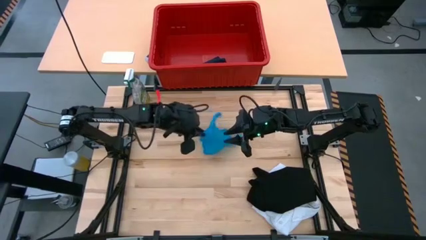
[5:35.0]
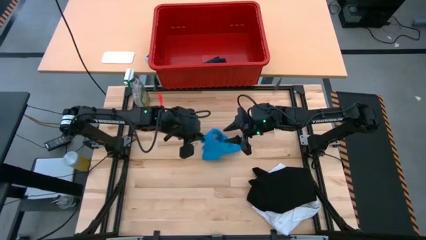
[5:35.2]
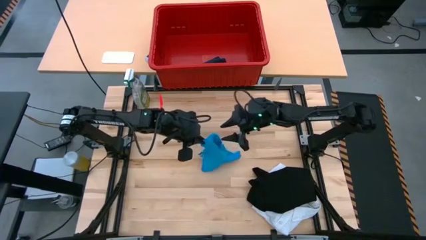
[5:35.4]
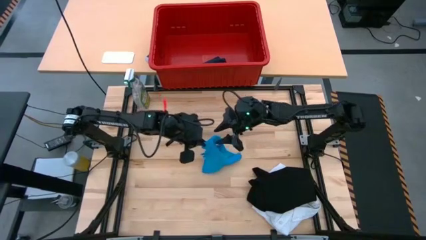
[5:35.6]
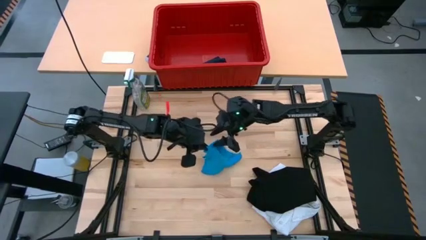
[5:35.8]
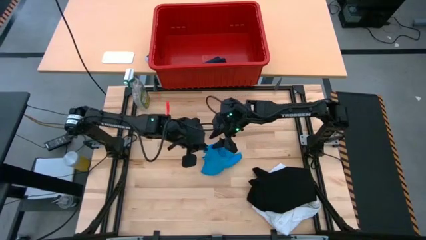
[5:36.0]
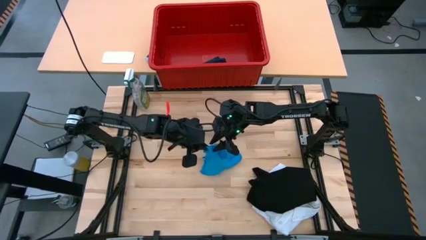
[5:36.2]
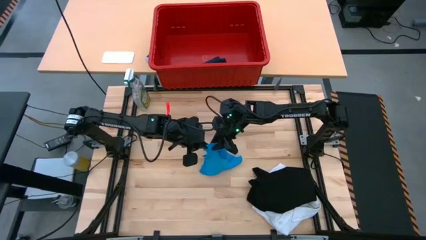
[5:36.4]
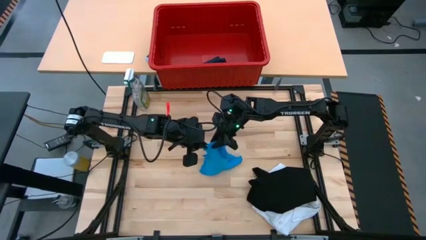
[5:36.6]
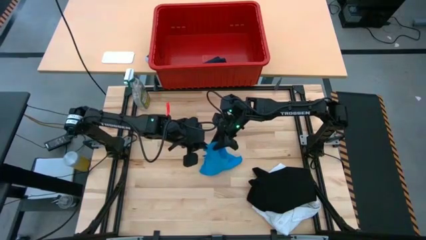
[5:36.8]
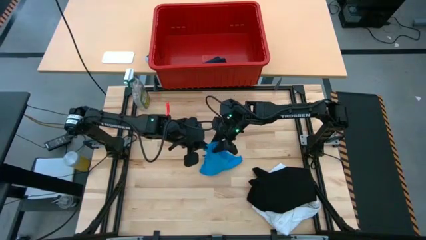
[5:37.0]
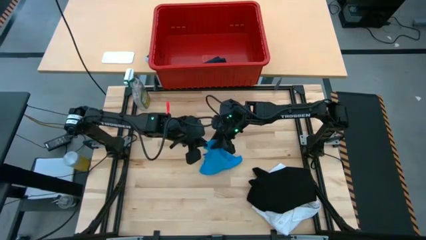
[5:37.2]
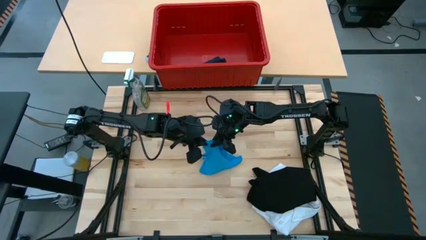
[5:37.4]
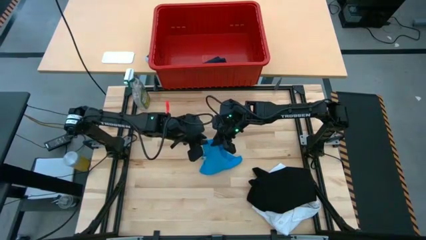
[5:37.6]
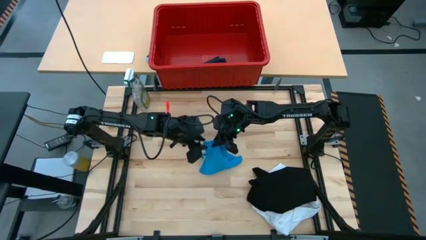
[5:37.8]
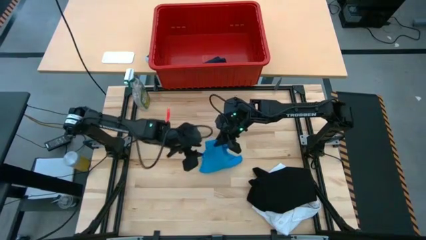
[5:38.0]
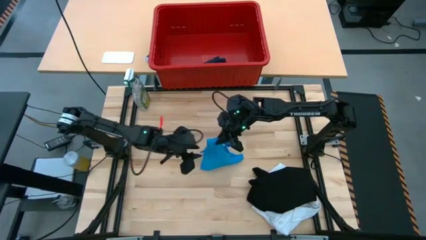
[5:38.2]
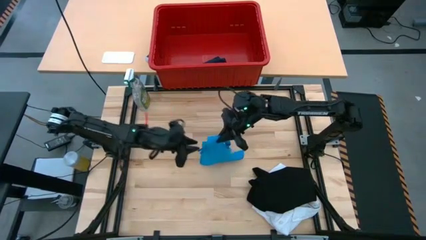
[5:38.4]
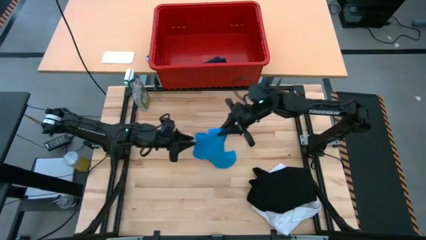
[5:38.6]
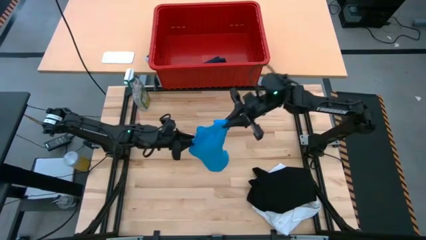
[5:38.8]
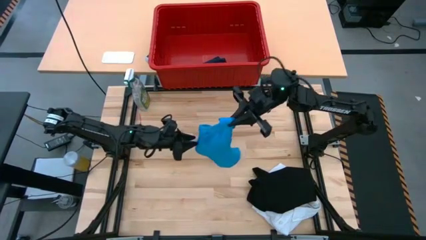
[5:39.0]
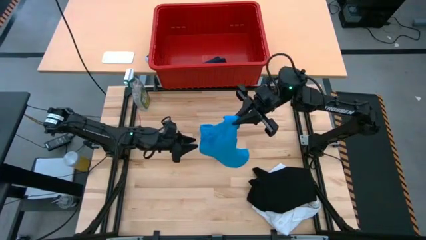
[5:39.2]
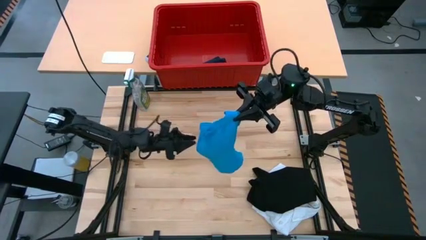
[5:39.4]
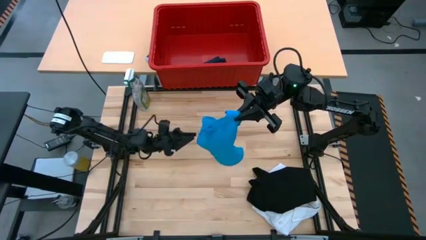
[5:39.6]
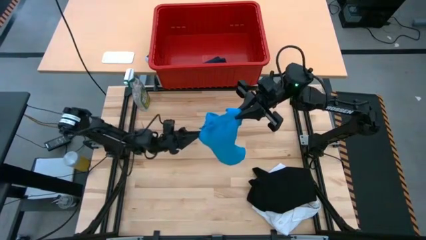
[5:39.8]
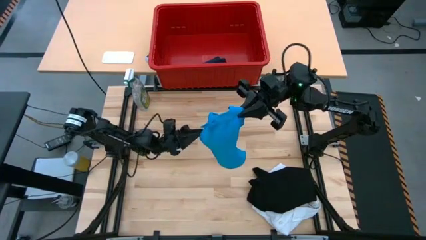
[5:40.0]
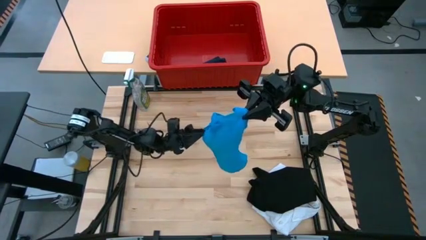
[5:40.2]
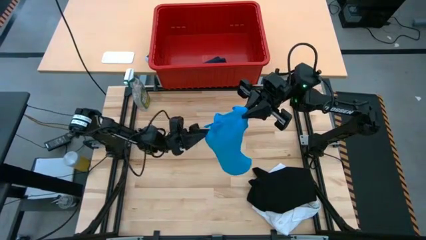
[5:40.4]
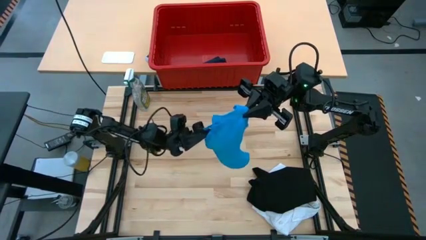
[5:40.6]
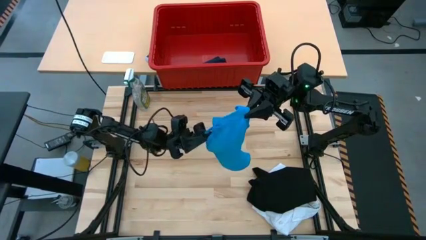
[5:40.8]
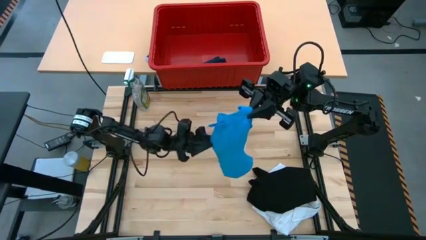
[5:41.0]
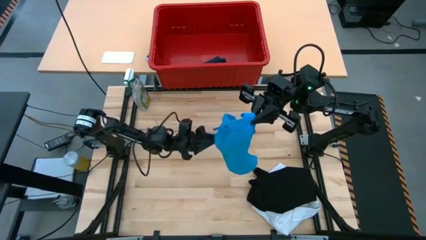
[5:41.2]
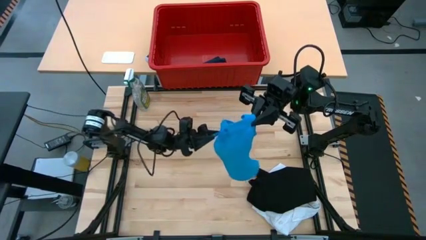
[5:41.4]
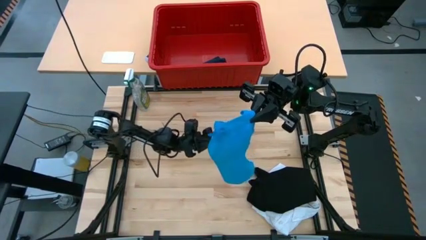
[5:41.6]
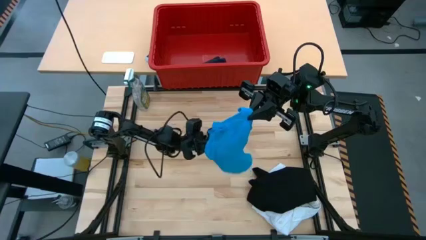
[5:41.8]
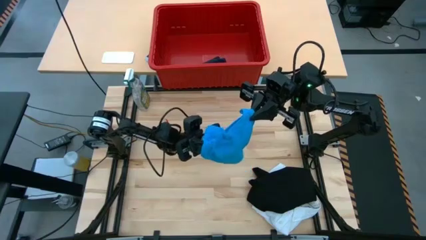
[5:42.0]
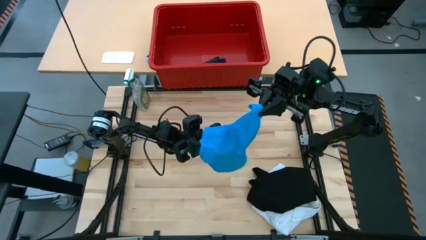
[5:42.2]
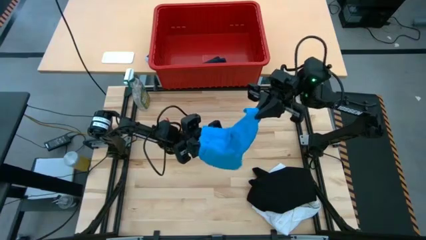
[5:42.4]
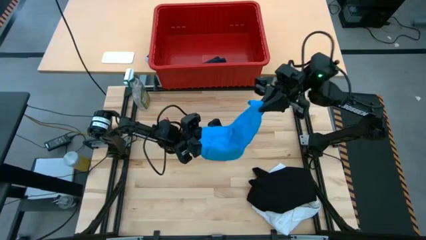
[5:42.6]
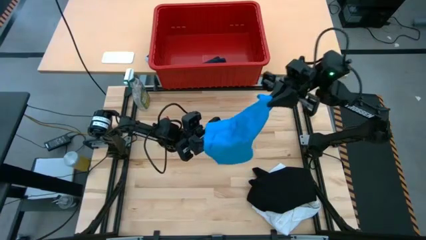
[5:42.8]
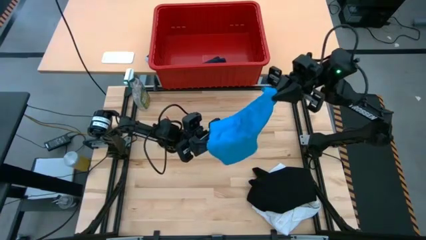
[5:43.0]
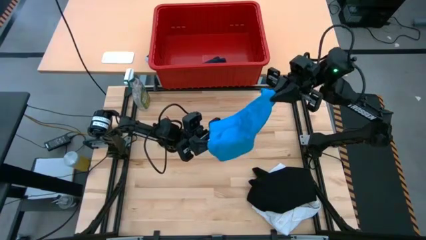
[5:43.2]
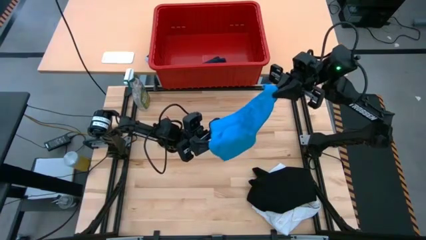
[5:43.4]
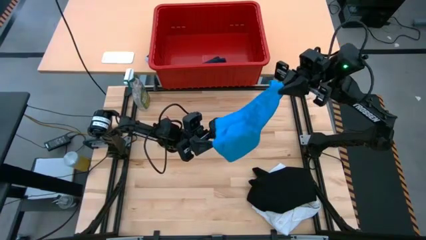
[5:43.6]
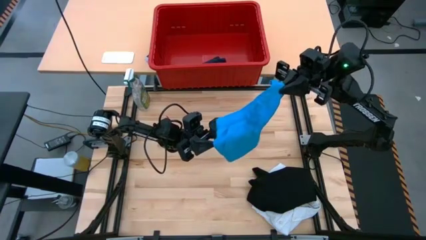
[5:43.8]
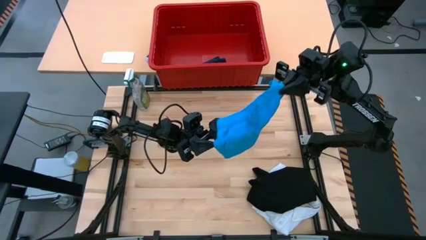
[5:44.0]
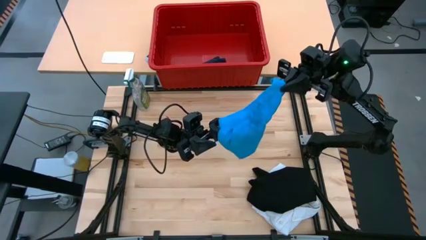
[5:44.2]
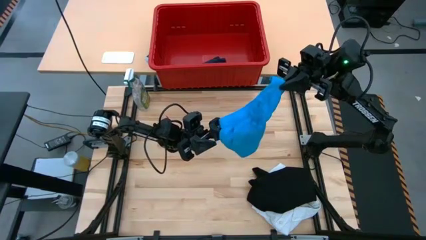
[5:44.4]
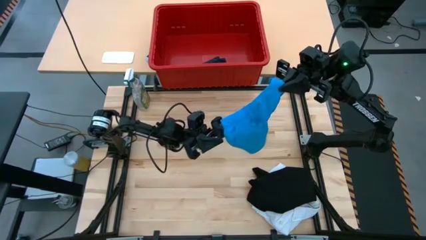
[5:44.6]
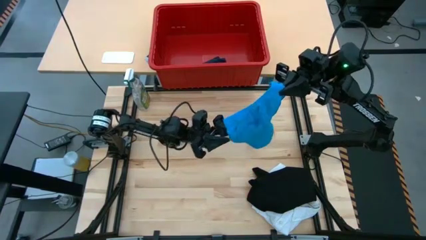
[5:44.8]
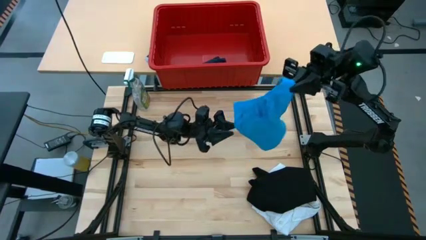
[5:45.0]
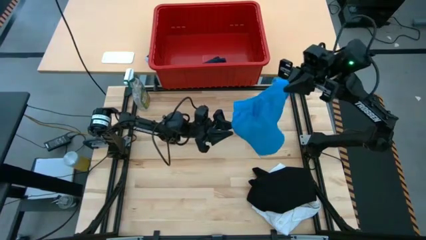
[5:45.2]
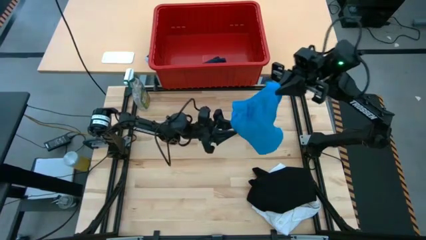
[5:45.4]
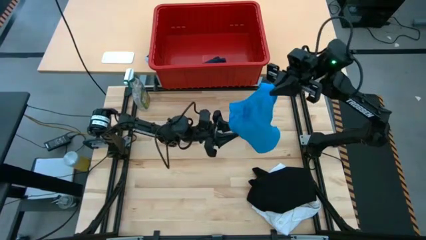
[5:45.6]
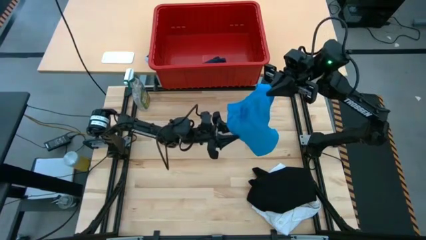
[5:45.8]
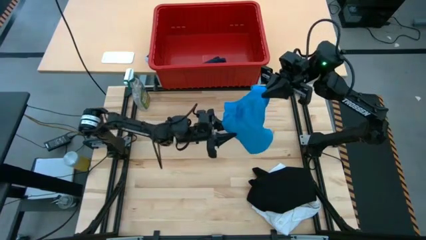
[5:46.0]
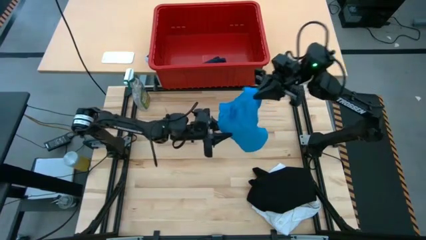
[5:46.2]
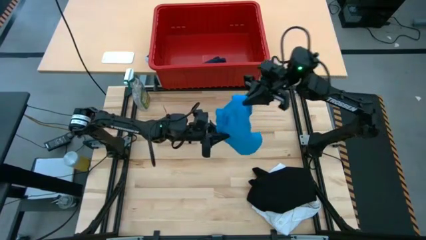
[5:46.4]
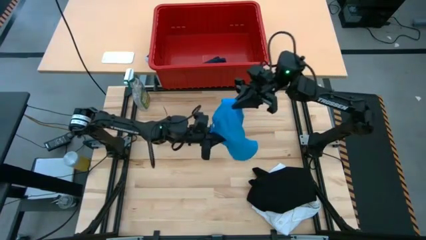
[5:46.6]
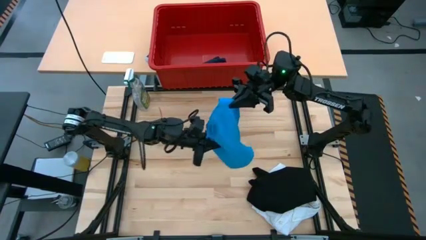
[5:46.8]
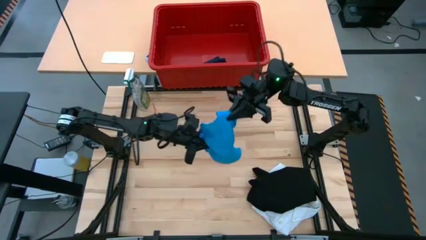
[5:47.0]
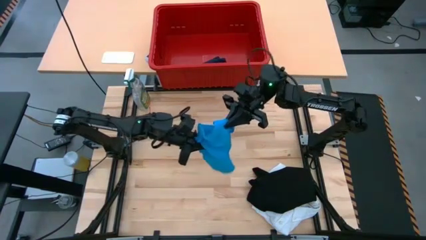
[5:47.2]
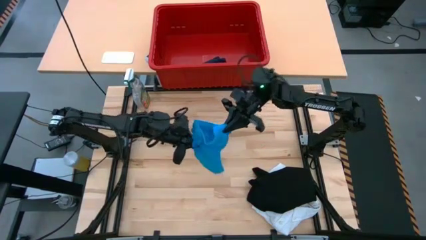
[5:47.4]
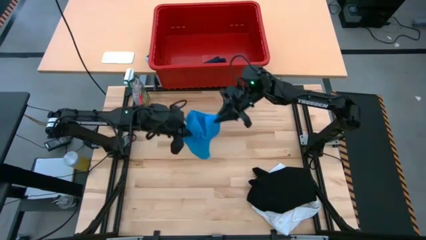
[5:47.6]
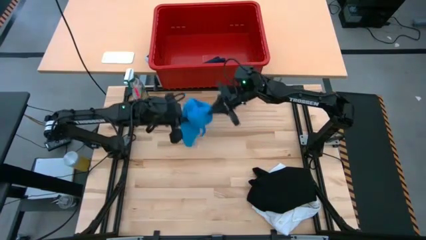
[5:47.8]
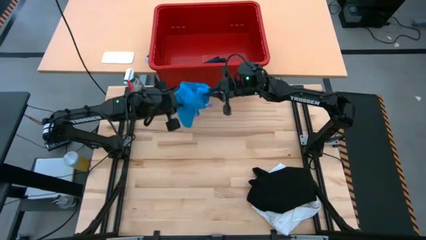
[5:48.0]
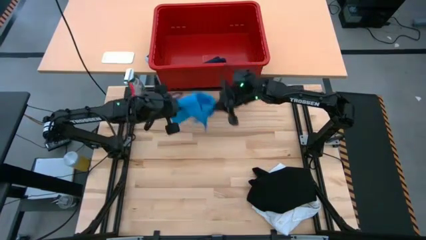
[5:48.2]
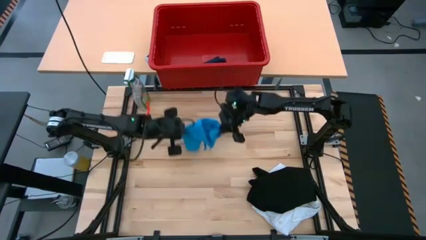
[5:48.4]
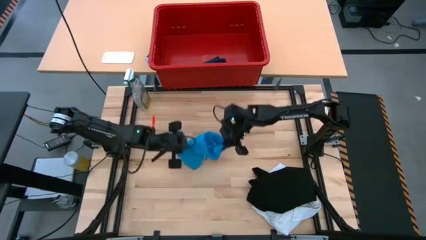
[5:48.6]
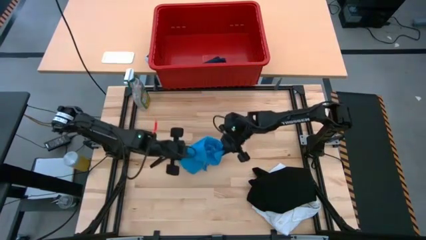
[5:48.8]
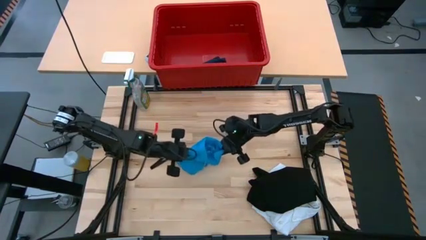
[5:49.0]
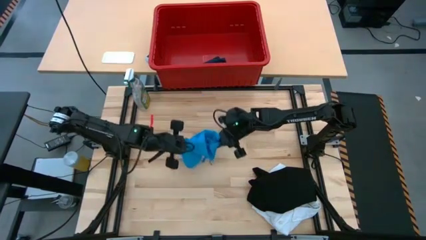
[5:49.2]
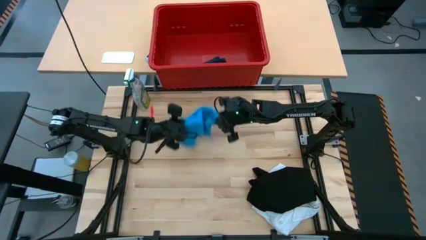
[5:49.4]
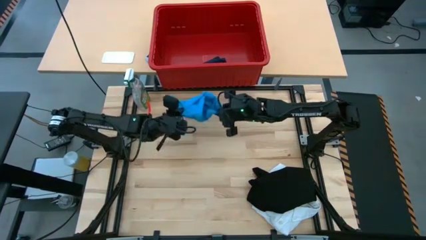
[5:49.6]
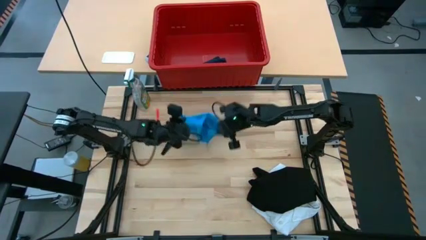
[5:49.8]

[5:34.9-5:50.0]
Task: Fold laundry
Fold the blue shorts

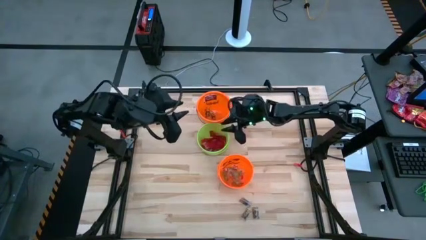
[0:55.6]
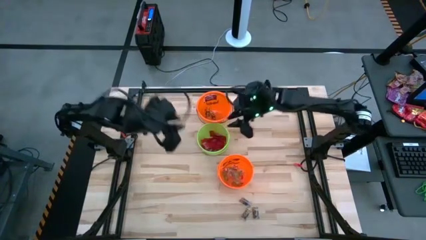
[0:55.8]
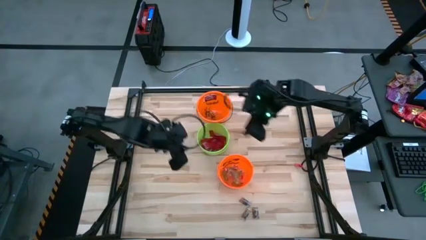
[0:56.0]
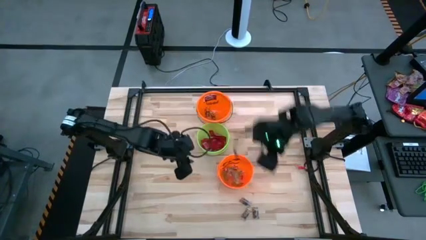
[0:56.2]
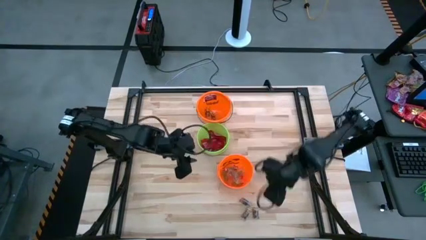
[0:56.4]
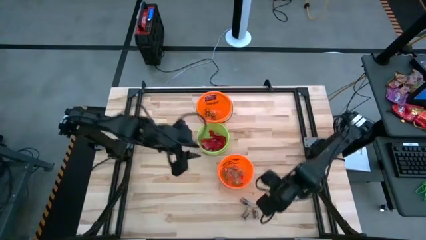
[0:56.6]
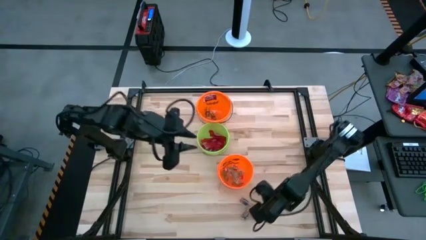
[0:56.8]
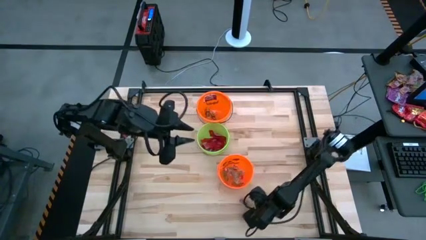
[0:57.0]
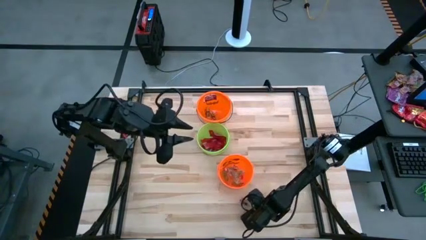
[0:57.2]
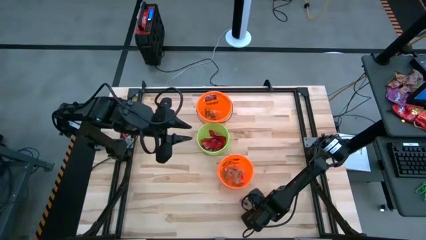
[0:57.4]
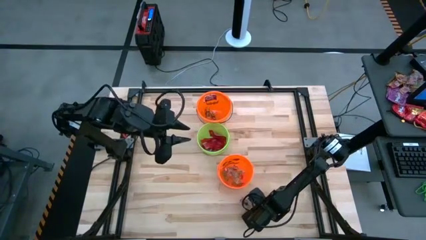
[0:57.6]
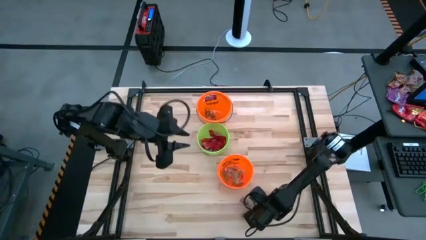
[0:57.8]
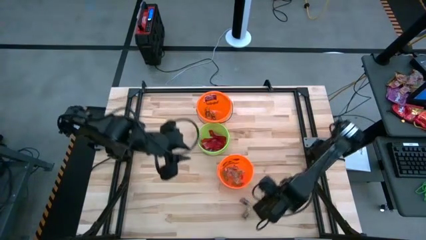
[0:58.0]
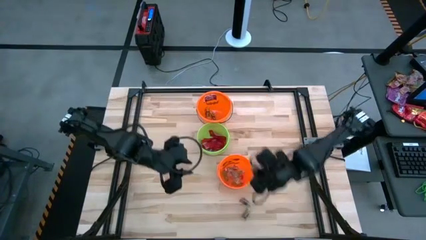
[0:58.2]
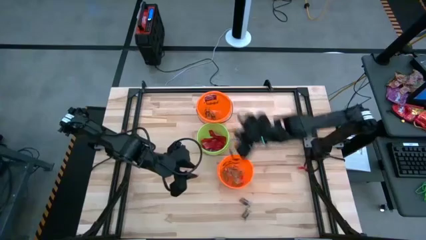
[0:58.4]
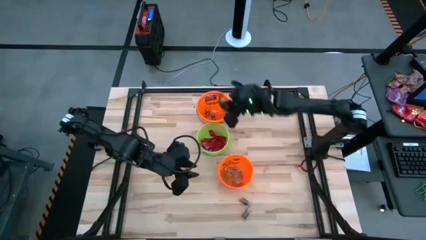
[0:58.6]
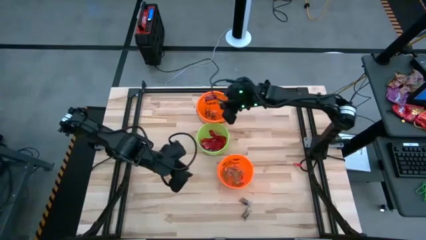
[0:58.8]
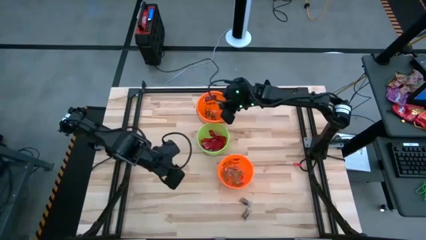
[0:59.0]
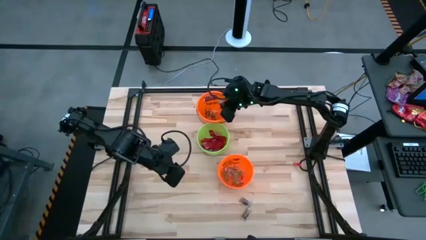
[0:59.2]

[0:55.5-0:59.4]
Task: Sort candy by brand, put in halloween buckets
Put the black gummy into the top orange bucket
